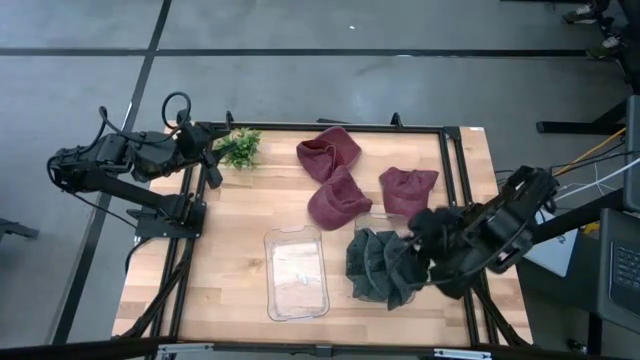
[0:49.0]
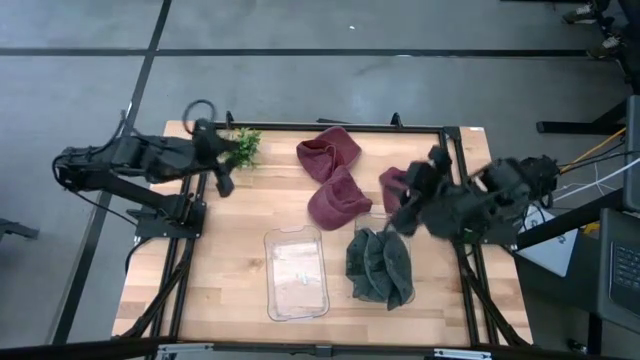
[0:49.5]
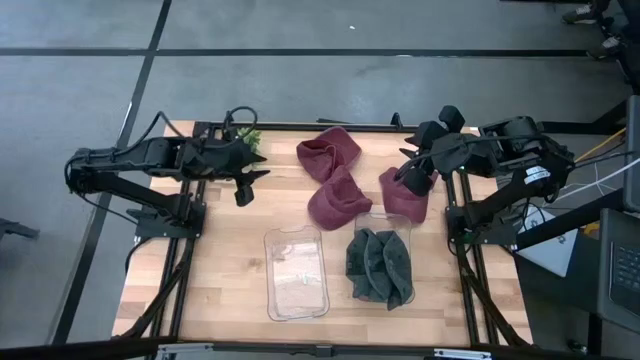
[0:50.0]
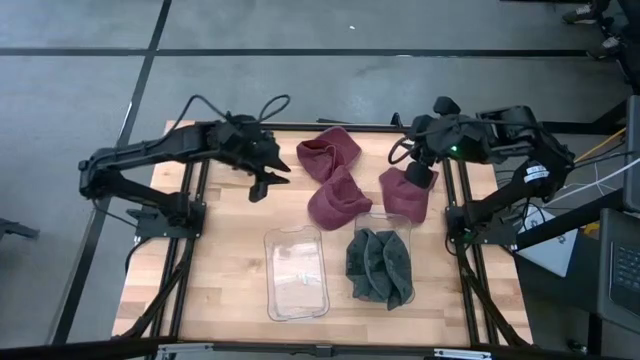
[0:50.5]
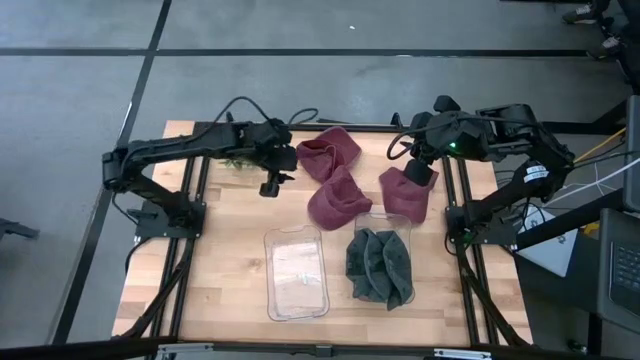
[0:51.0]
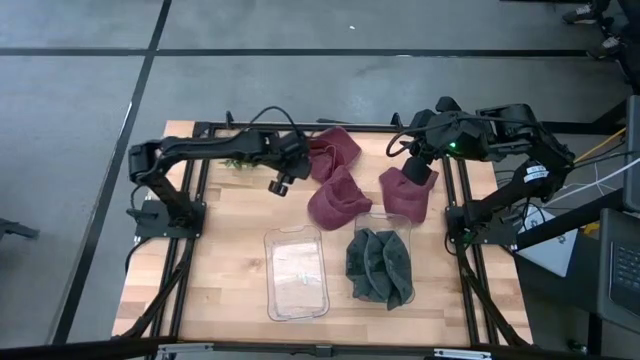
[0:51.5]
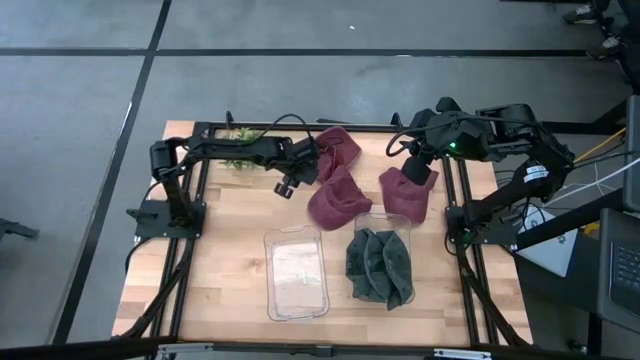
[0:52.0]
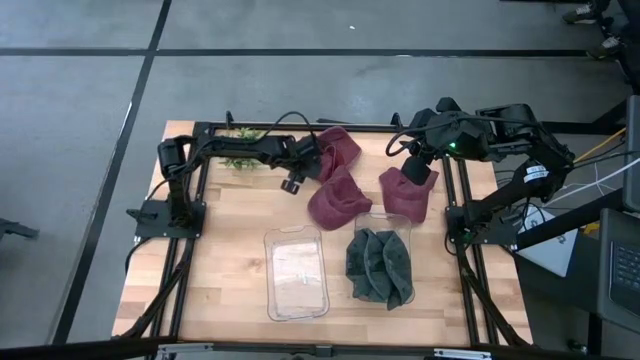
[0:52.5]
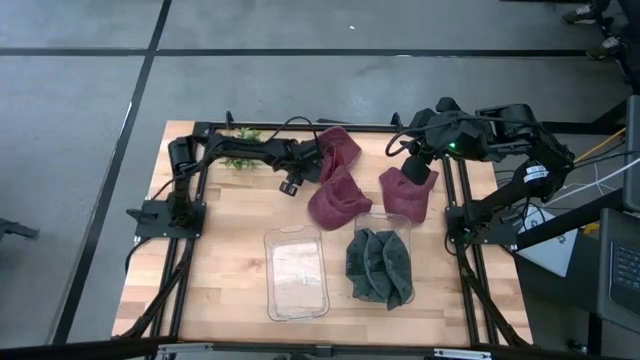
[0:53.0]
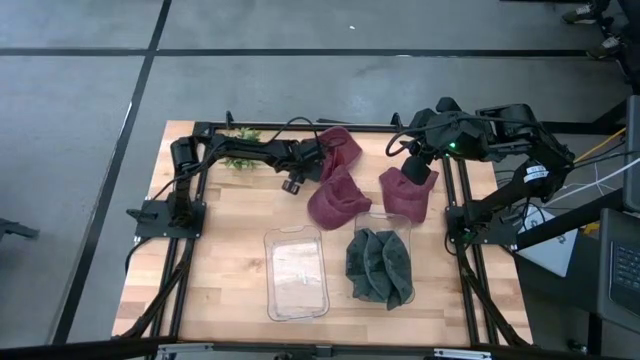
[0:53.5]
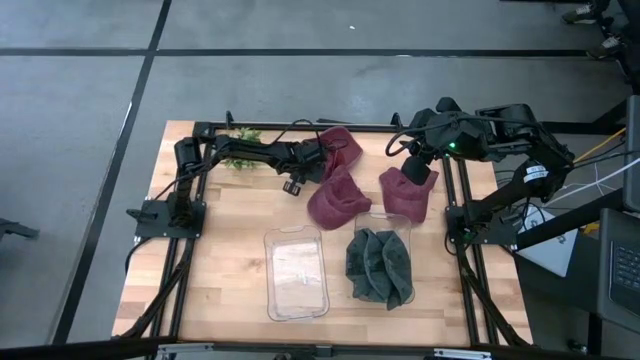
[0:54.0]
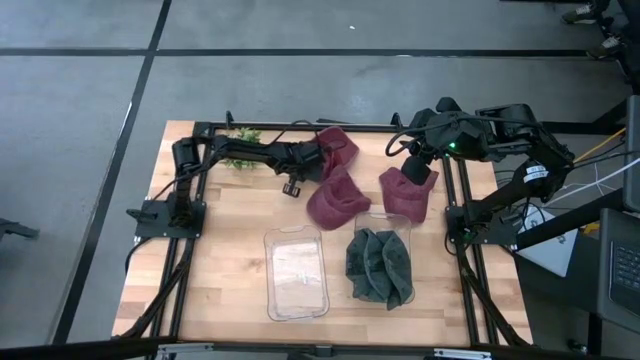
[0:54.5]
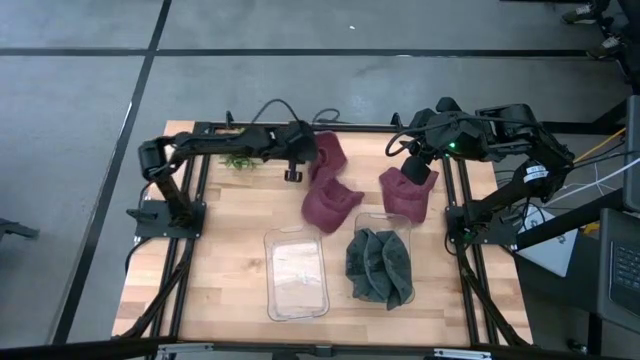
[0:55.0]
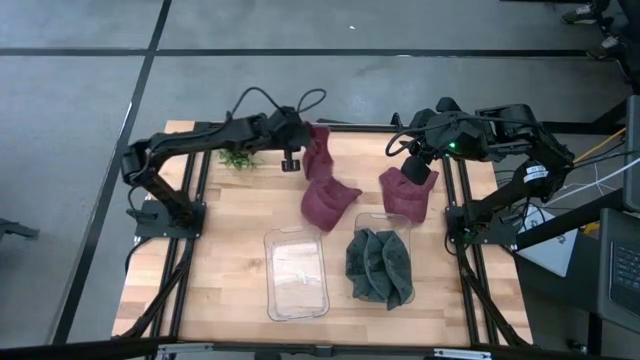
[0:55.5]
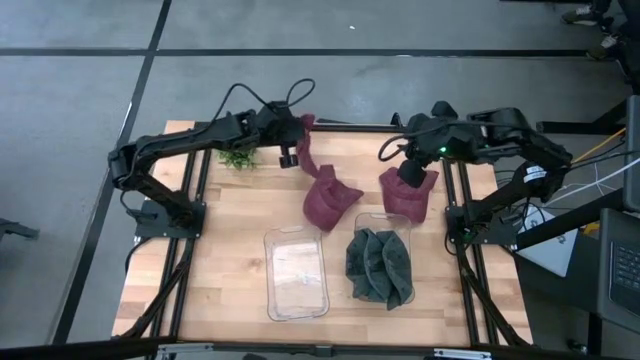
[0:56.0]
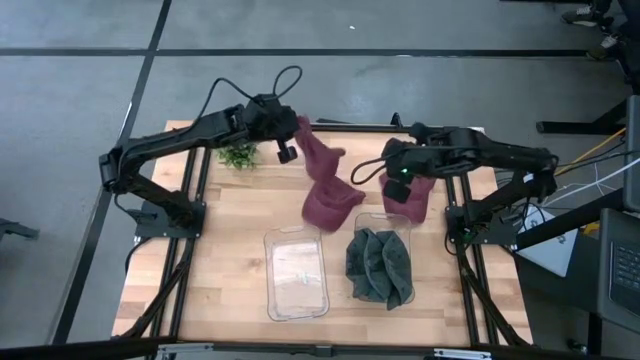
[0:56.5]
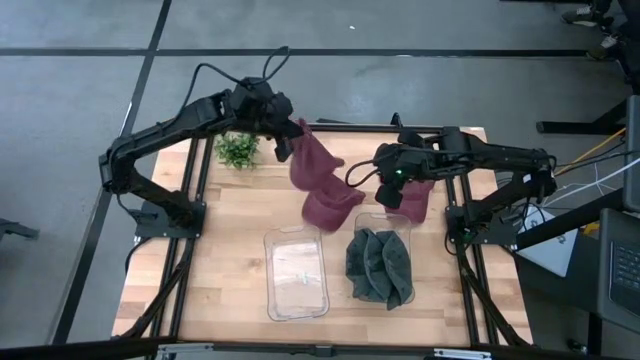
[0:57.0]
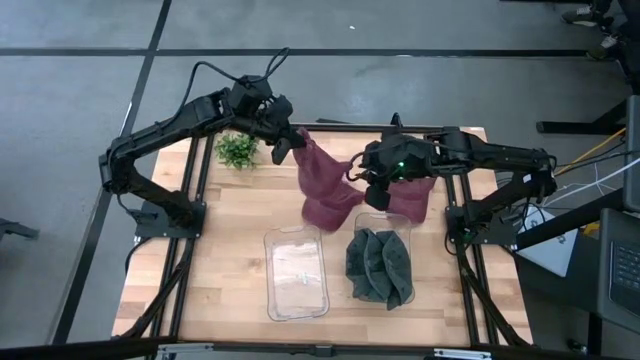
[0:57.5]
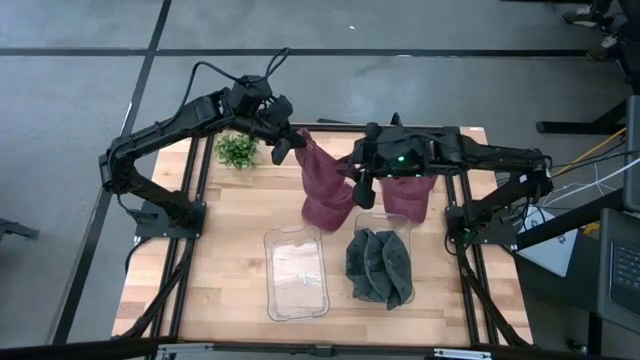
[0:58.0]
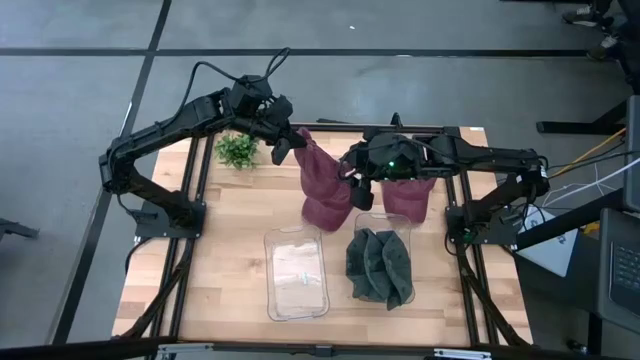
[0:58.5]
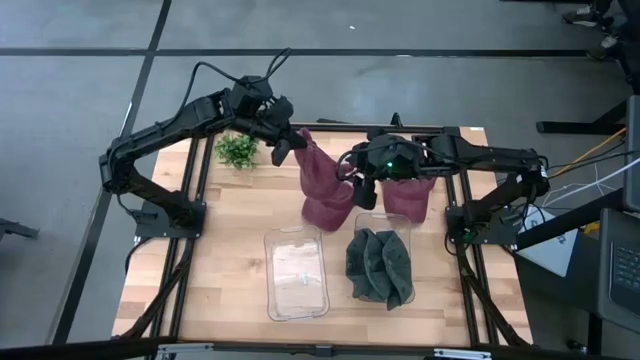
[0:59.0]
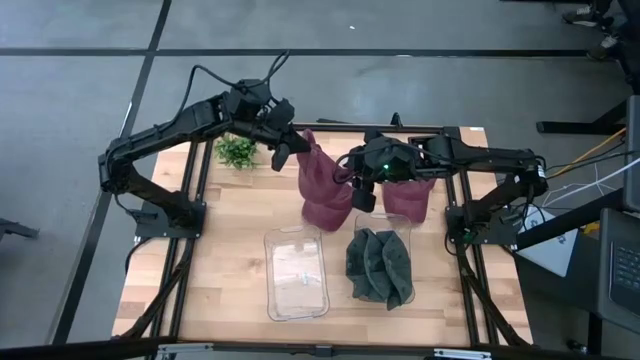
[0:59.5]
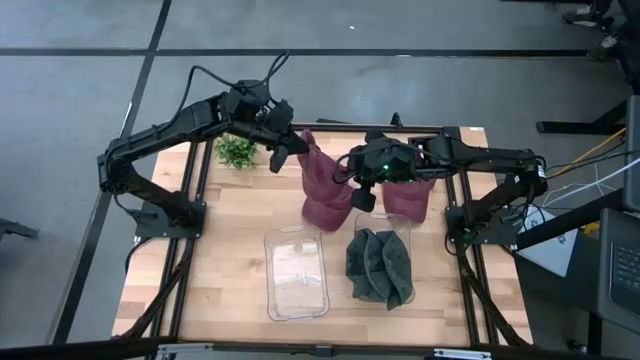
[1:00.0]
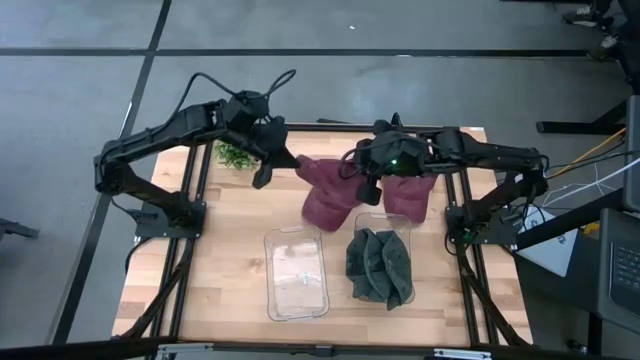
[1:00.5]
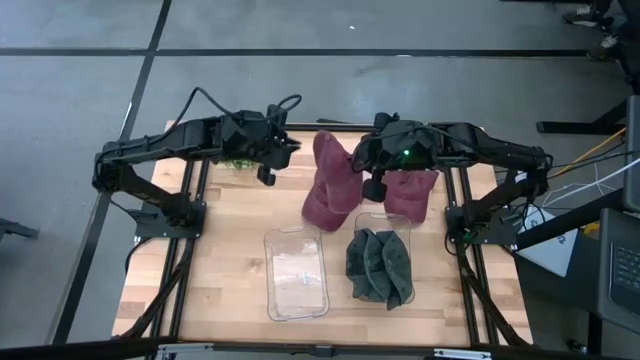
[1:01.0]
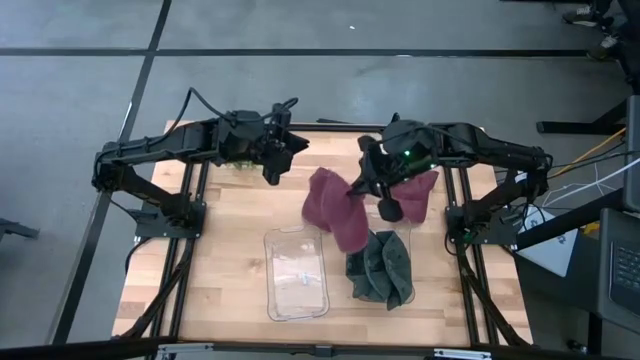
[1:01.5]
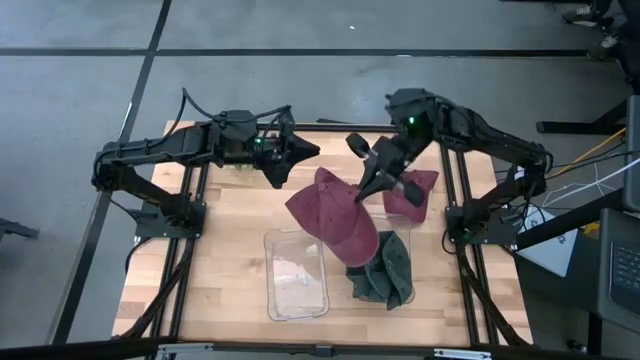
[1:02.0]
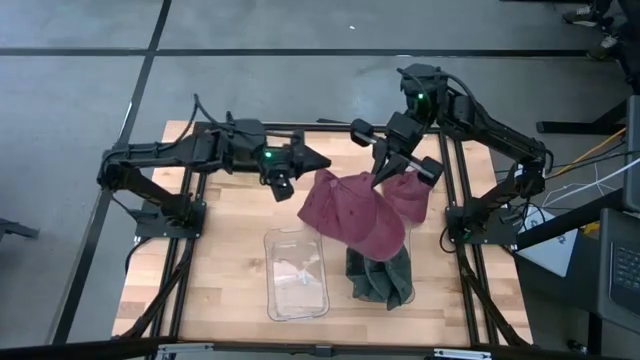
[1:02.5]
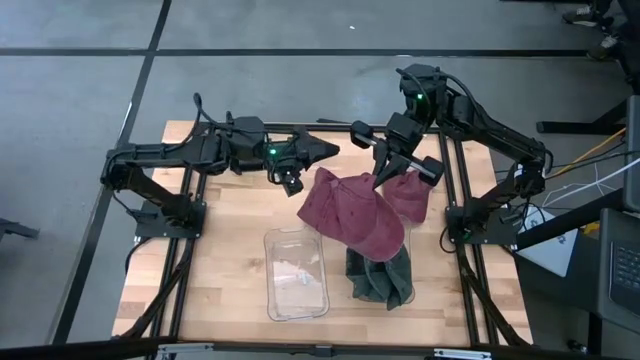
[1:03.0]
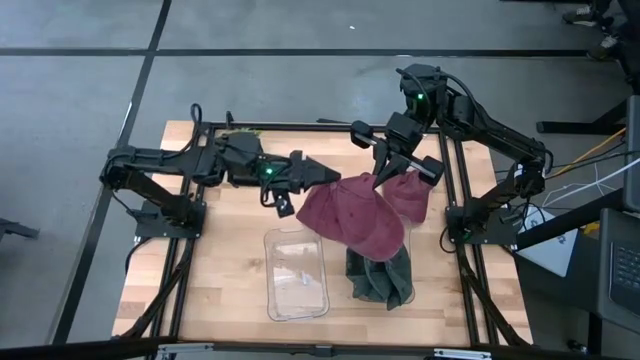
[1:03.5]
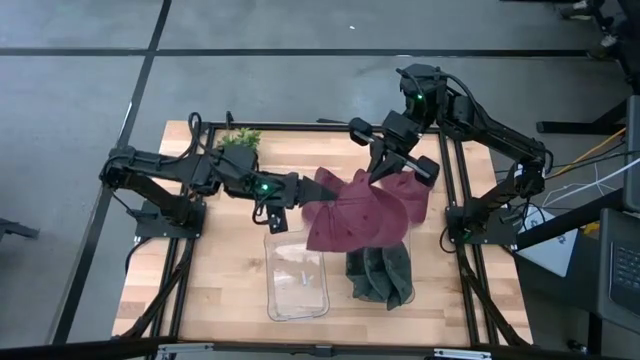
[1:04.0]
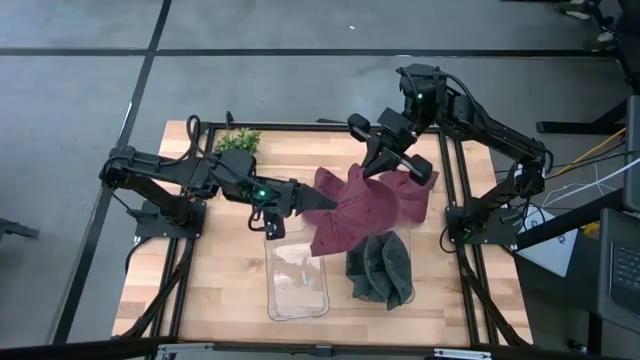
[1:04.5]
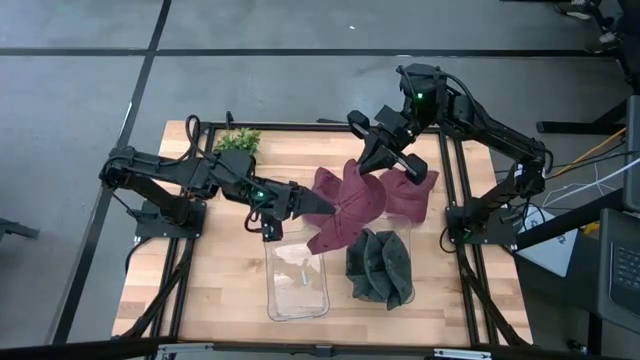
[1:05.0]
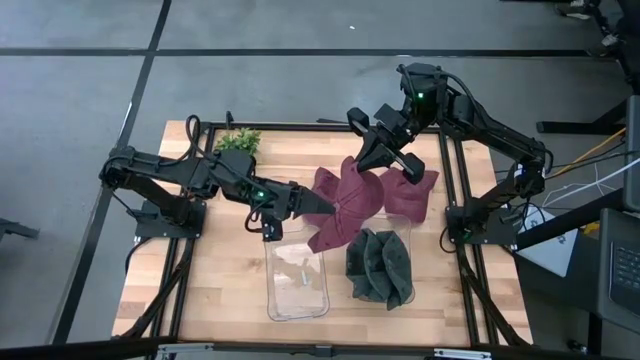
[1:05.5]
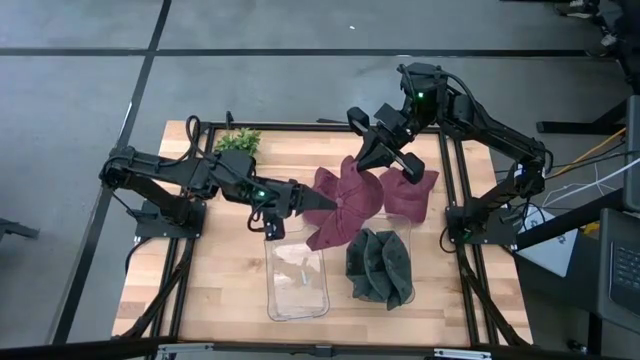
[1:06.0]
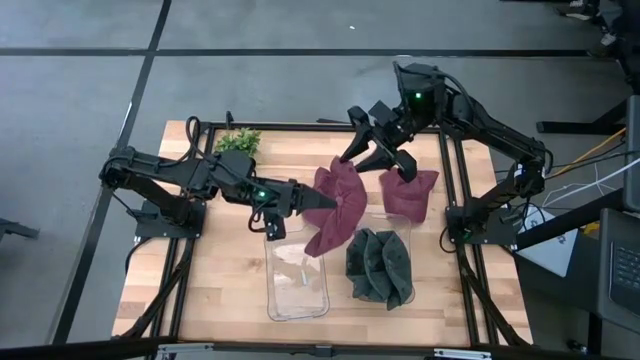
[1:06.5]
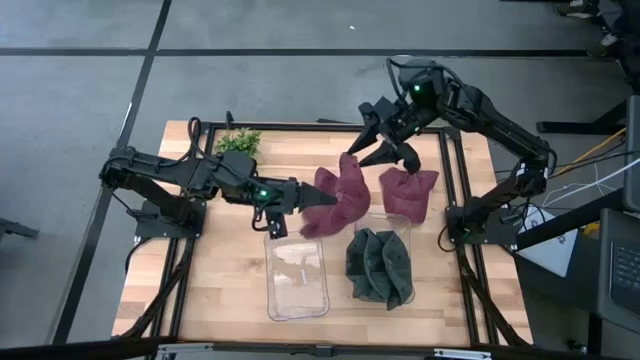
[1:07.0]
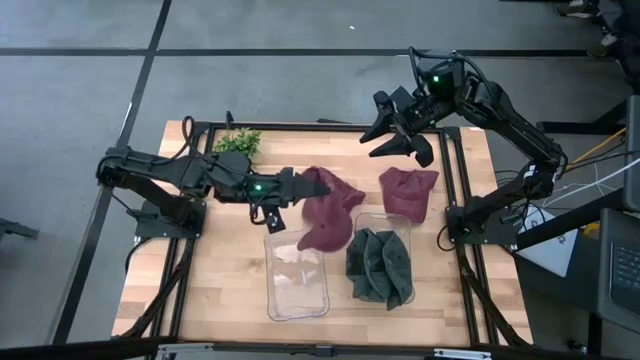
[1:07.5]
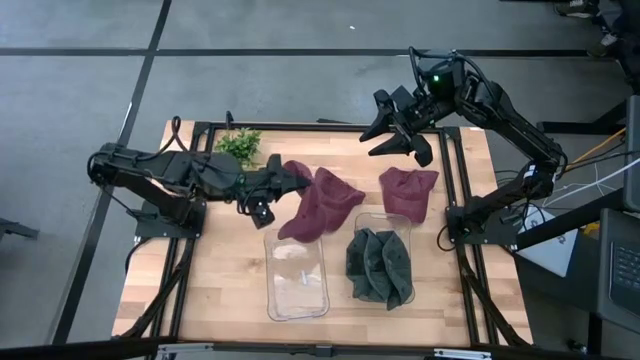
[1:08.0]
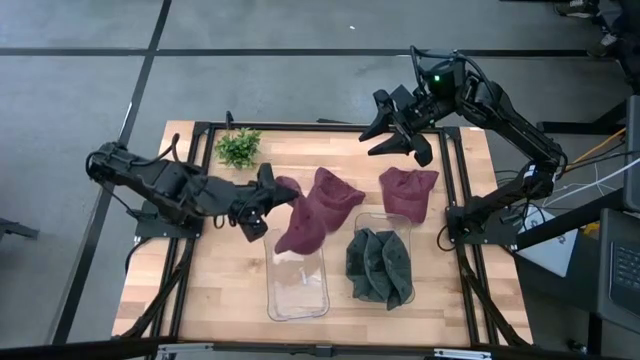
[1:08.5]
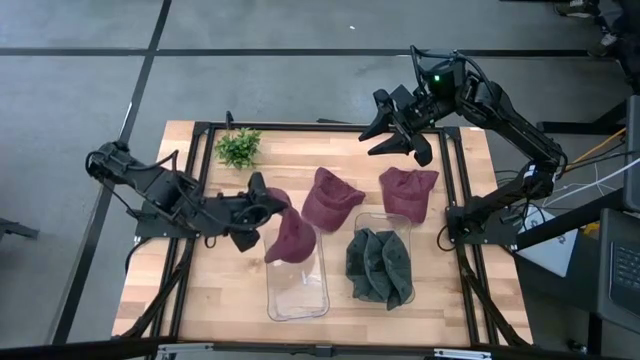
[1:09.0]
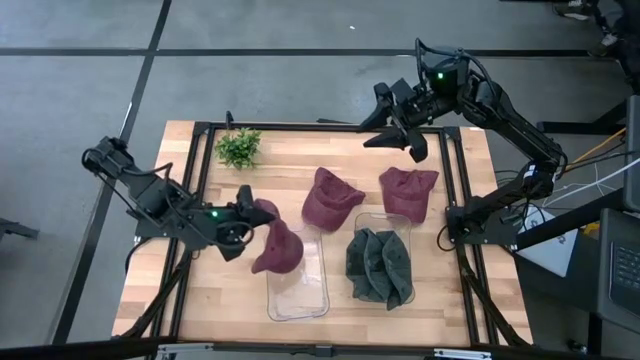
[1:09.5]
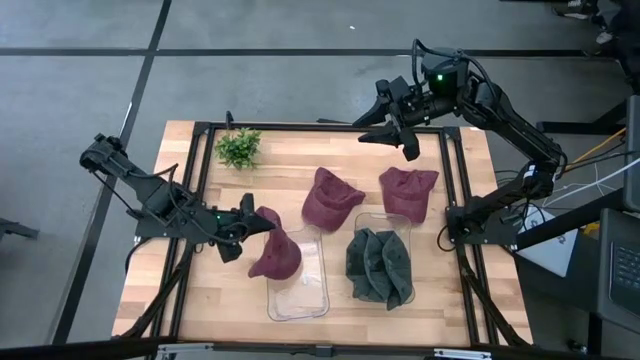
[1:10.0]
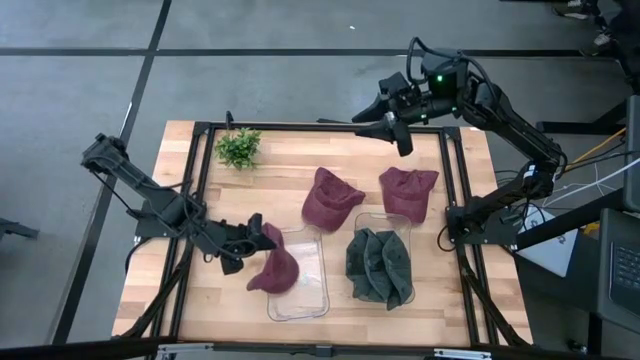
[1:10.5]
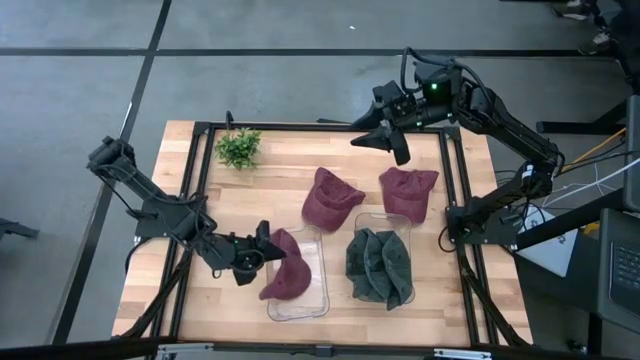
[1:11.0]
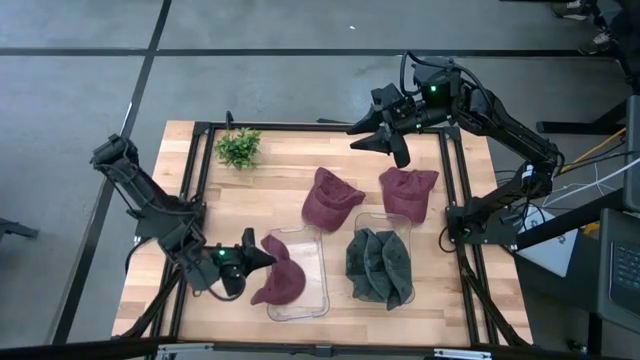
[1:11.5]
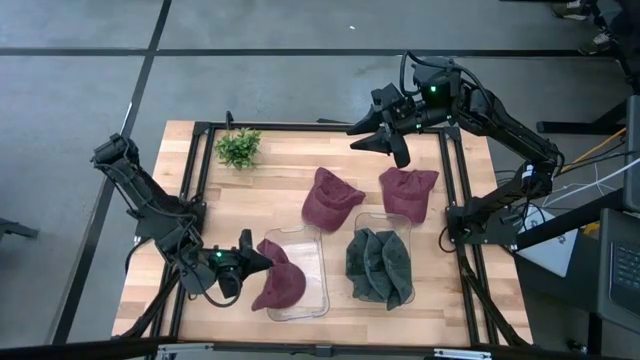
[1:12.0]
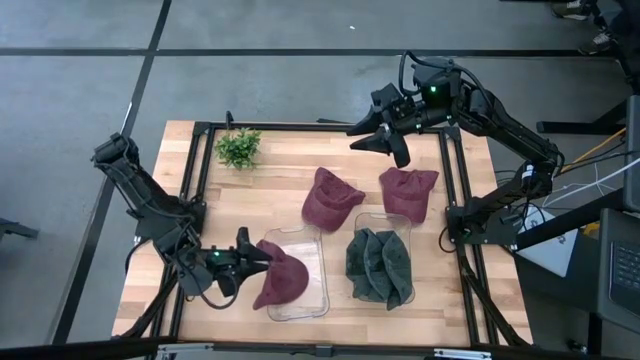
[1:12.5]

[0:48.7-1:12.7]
Task: Pick & Place hat
Put the top pink cap into the left transparent bin
